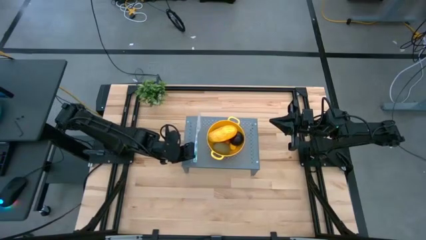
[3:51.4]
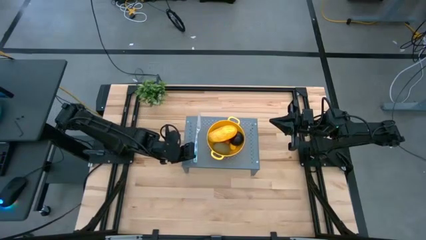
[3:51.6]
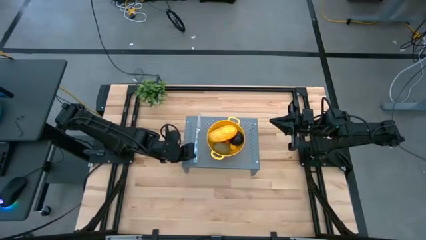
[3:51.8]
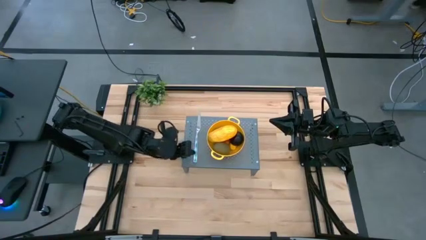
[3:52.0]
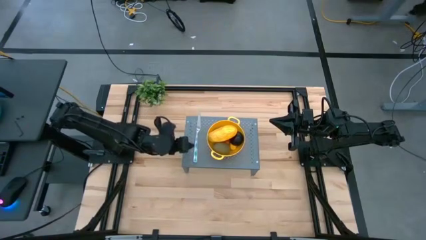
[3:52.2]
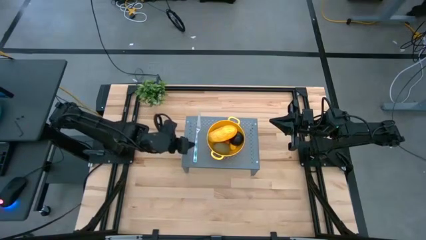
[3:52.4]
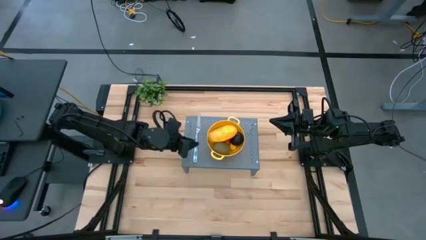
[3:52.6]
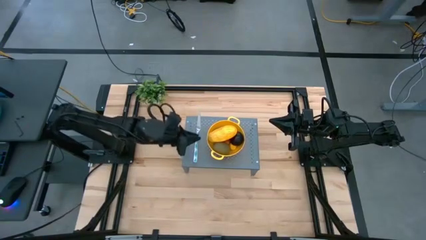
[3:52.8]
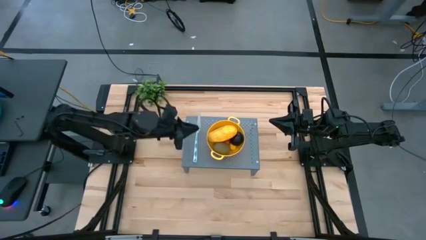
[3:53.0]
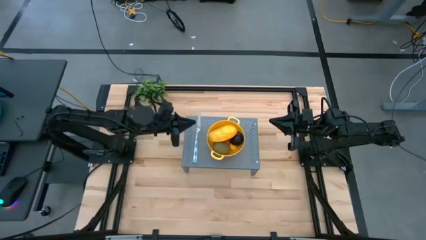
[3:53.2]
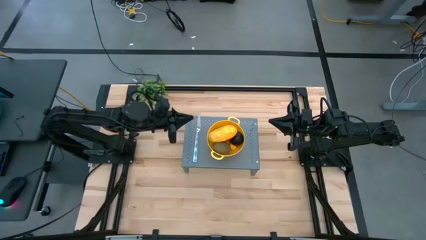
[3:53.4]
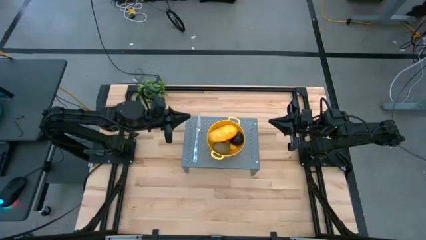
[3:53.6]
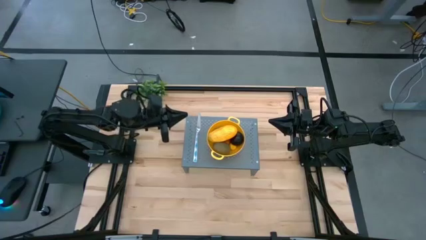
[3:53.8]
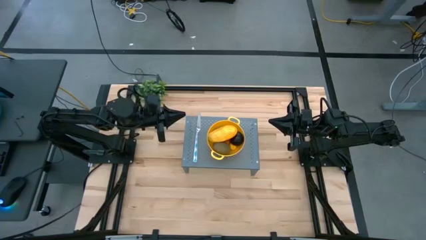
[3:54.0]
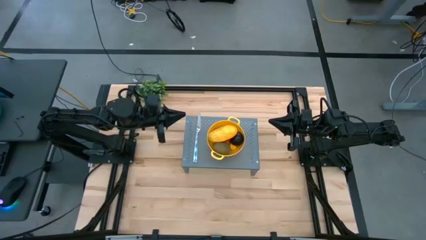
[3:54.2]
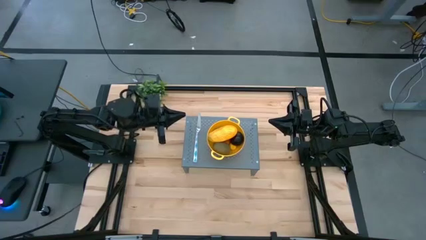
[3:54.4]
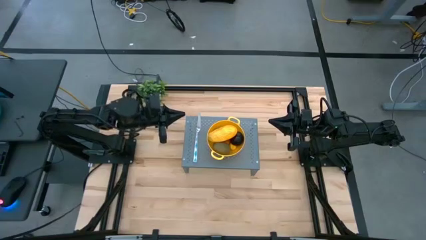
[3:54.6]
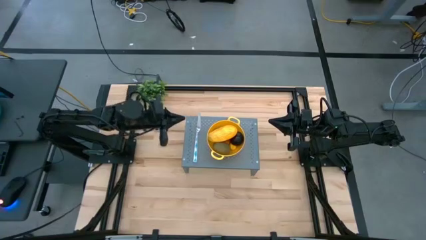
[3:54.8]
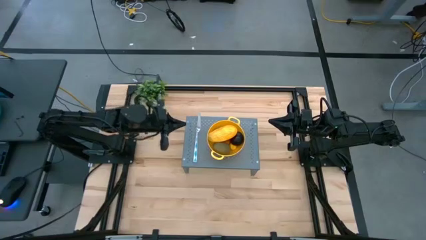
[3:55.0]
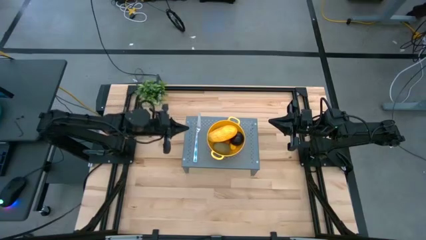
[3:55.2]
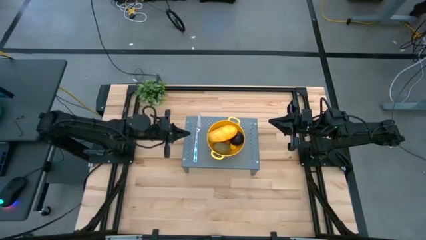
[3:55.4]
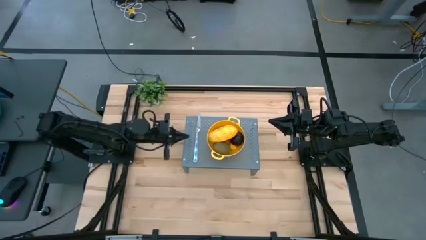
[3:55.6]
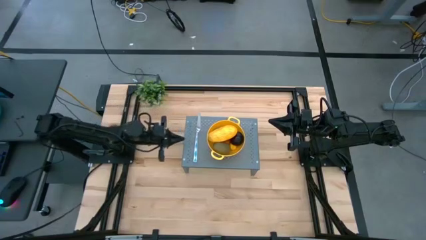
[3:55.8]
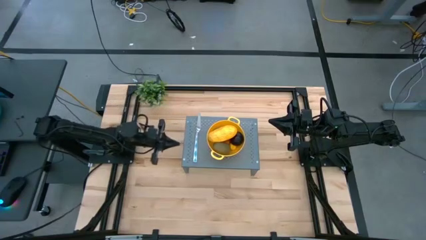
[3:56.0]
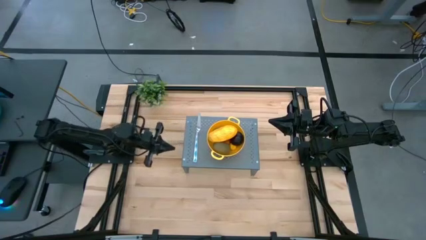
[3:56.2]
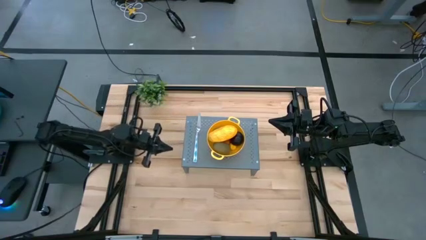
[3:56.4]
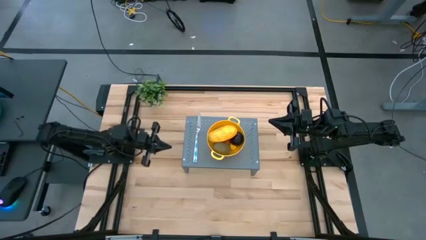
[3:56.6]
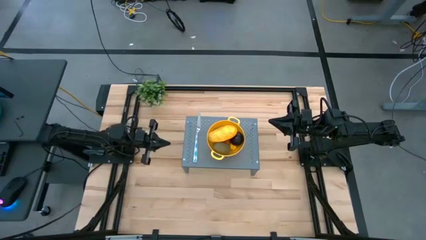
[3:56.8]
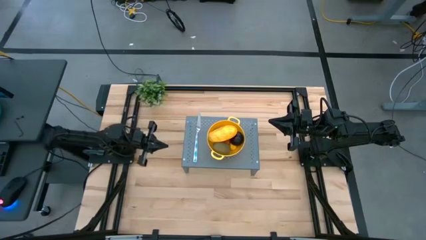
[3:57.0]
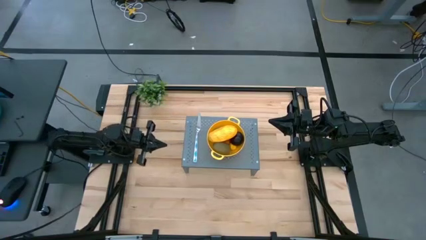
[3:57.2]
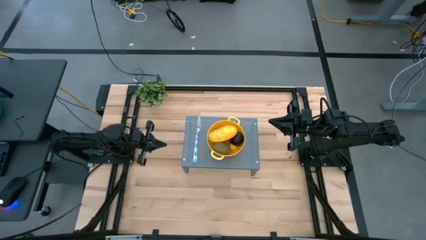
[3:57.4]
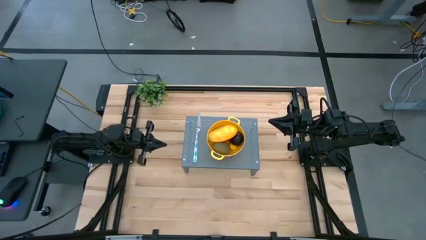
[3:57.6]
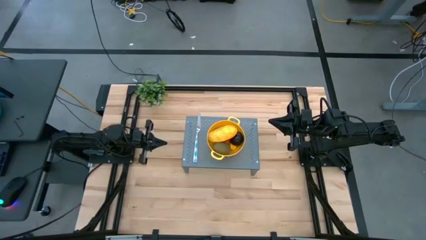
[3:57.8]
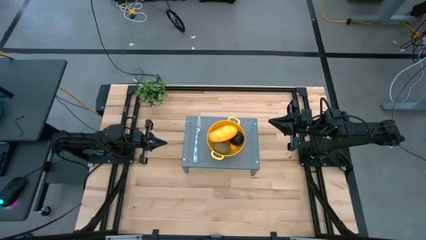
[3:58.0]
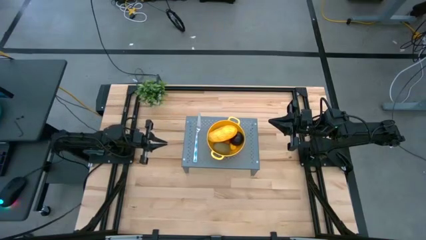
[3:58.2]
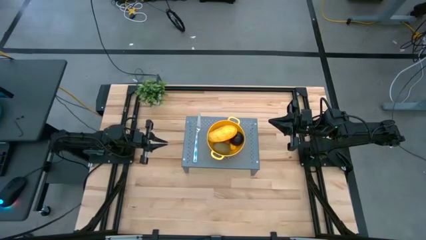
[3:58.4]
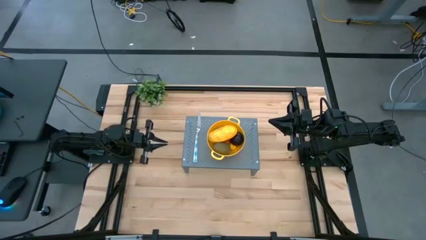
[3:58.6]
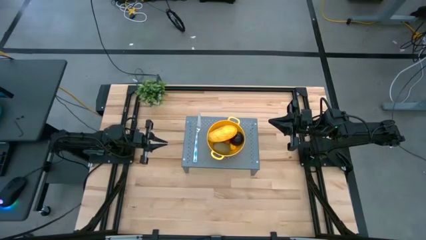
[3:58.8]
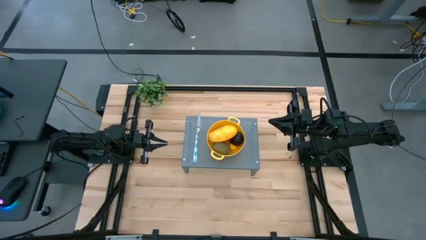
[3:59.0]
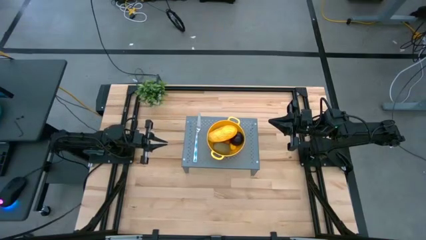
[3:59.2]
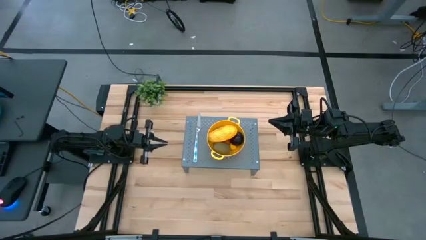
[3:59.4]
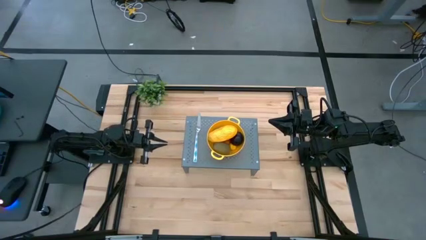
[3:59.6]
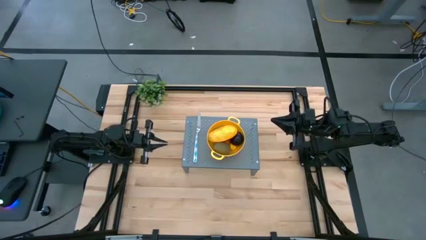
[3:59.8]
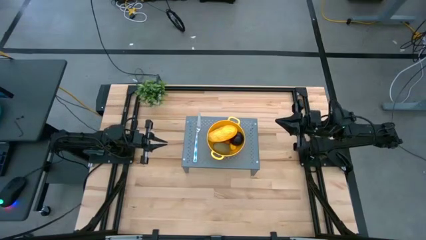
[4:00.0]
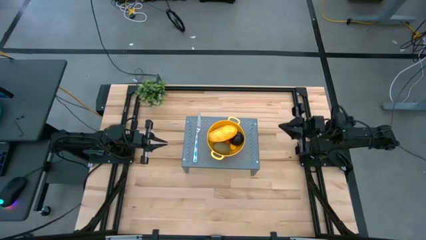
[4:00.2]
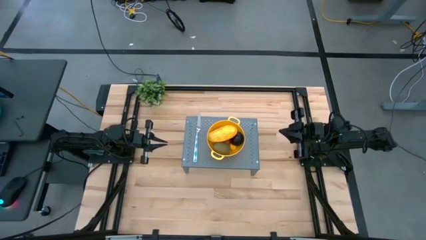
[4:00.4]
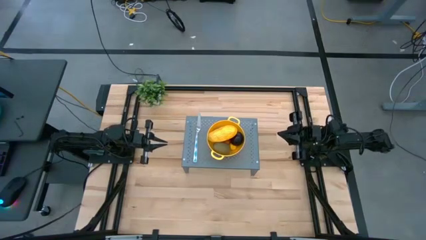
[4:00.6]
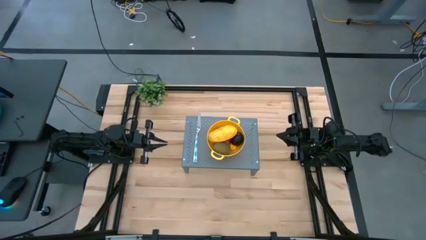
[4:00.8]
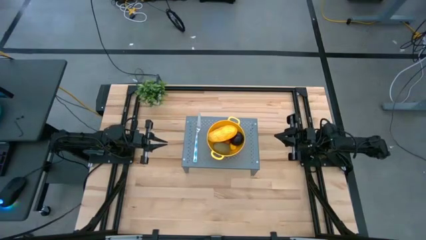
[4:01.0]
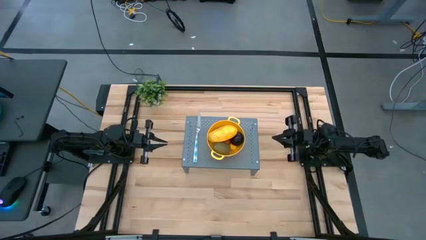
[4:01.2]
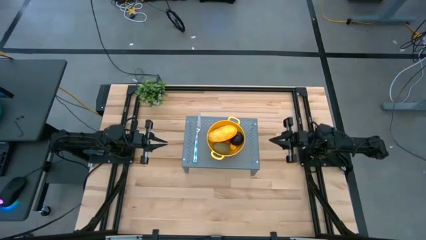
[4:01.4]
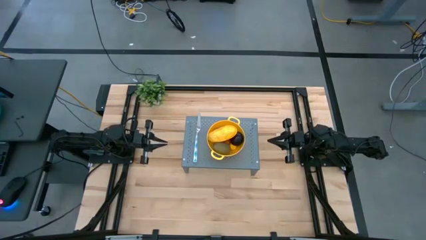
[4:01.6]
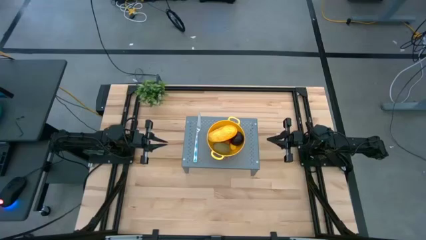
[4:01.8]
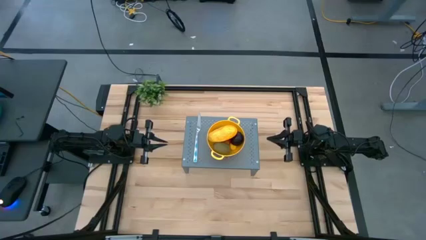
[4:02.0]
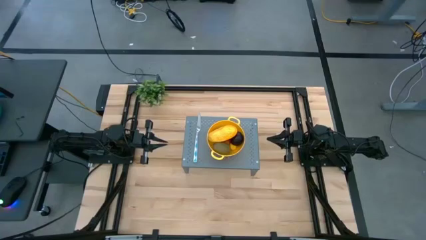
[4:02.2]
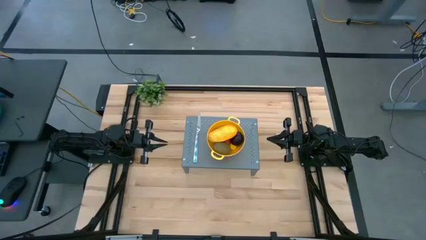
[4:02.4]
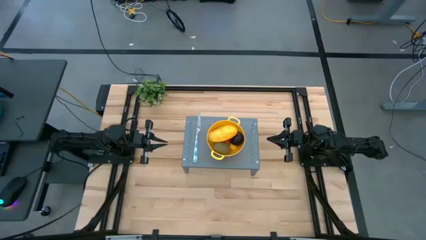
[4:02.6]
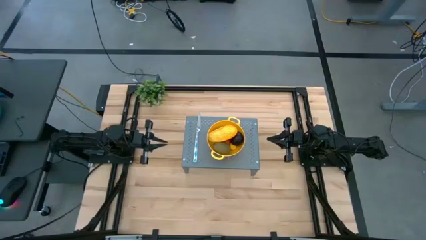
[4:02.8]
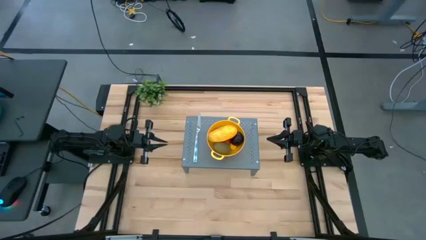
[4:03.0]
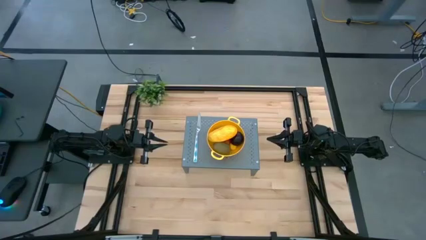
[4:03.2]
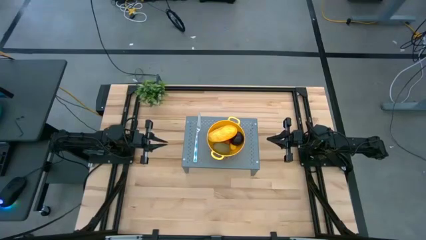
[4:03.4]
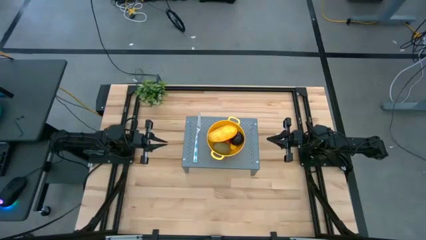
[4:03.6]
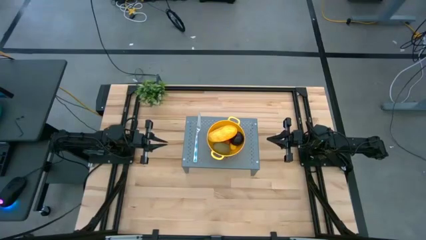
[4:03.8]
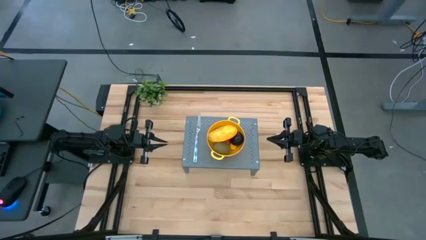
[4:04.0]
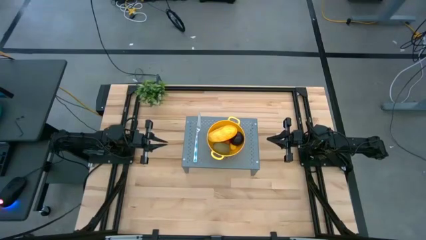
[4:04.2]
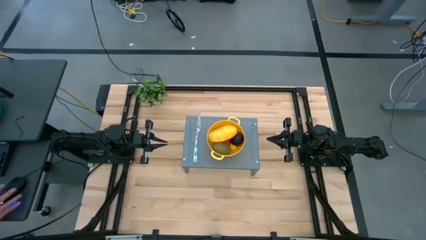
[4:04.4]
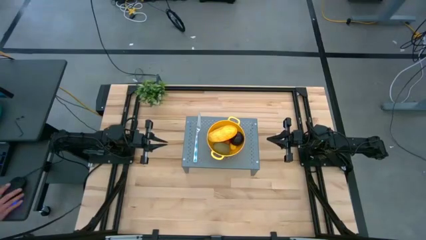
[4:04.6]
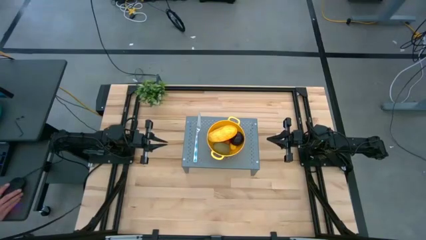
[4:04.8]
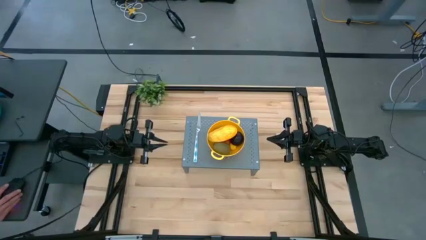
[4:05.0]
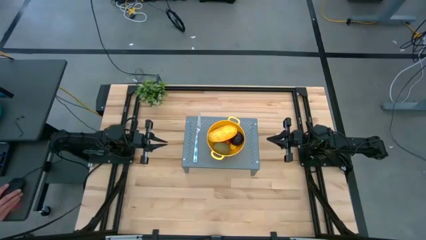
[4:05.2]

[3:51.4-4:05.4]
Task: Pick & Place Fruit
Return to Home Position

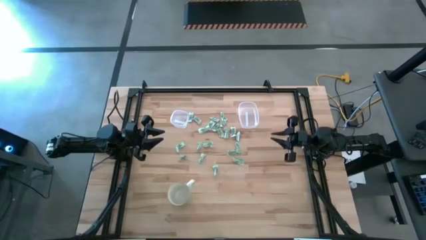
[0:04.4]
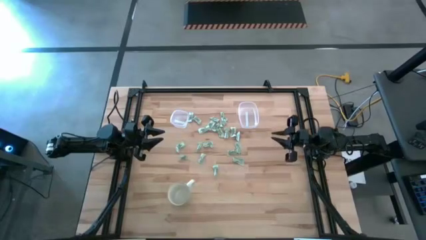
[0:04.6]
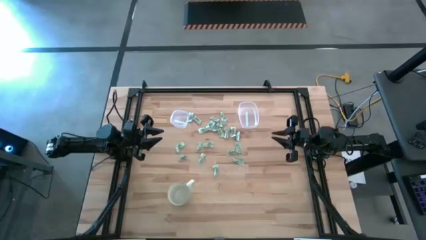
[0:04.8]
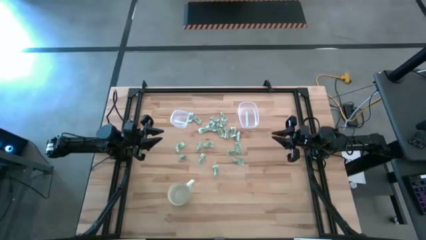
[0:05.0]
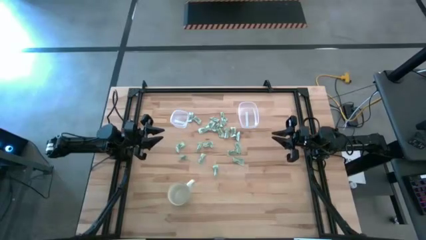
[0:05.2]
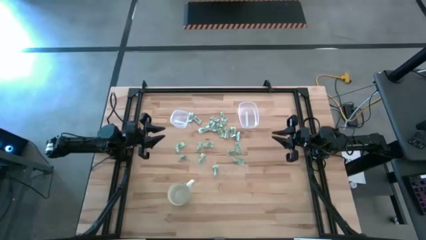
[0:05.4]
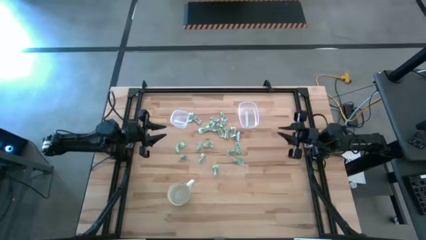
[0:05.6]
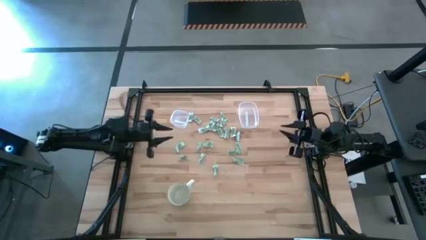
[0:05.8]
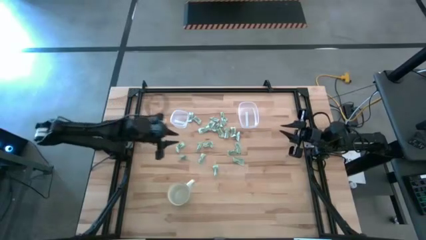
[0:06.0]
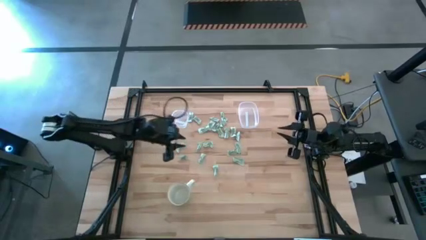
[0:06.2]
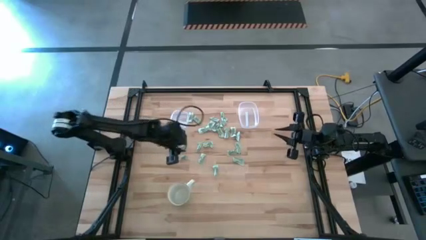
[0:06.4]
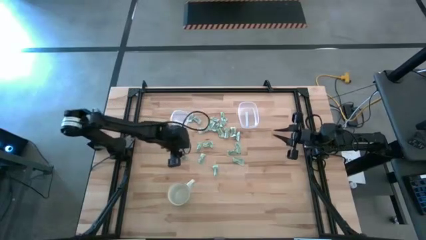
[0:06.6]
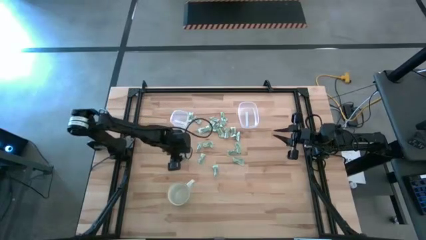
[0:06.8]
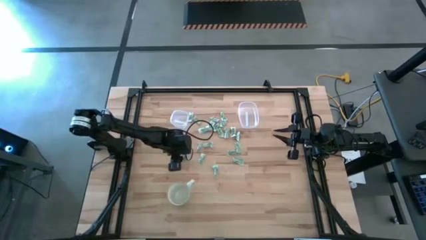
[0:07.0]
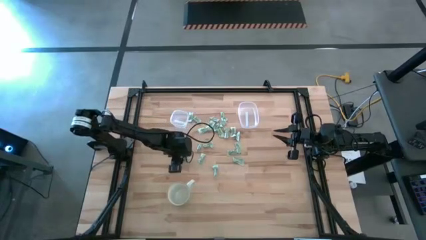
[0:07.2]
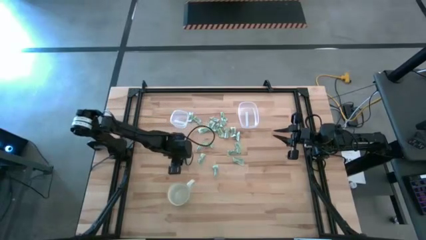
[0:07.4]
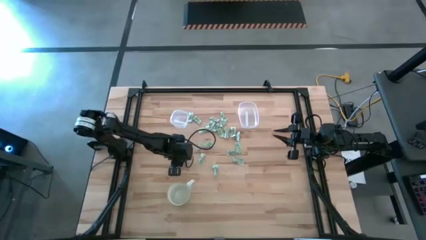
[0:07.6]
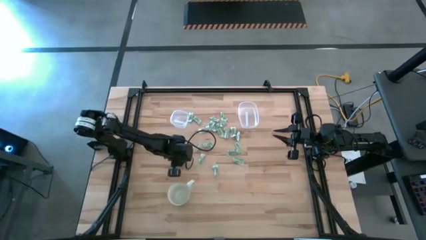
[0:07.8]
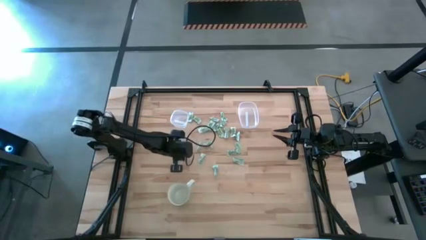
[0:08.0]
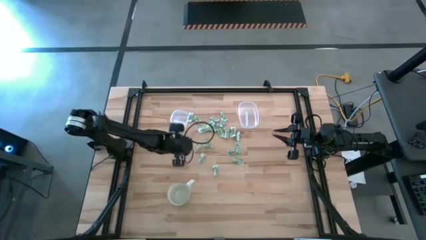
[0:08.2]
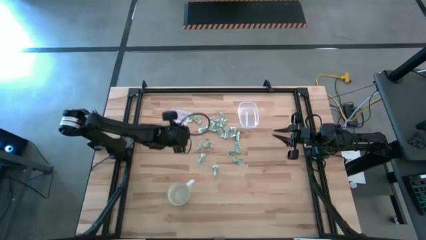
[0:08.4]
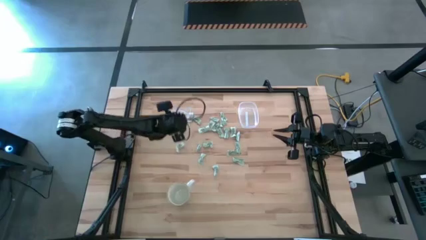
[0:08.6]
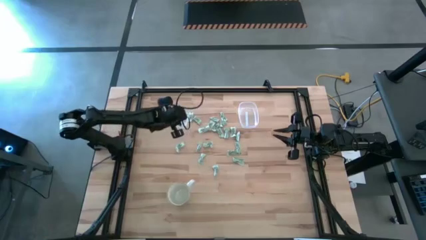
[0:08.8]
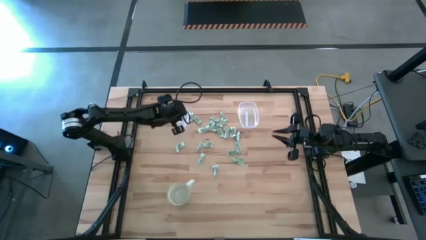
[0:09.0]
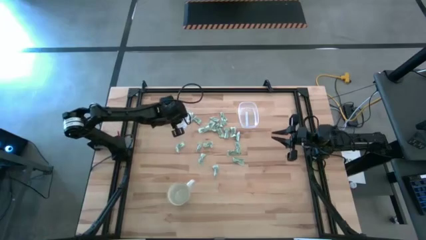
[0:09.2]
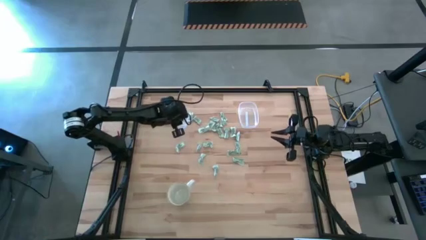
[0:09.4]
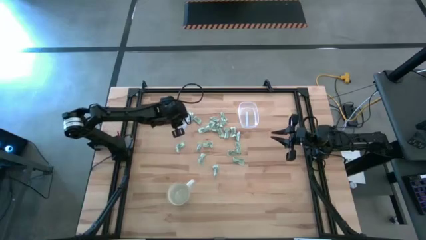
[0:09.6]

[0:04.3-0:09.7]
Task: Pick and place items into bin
Put the green stevia packet into the square transparent bin
